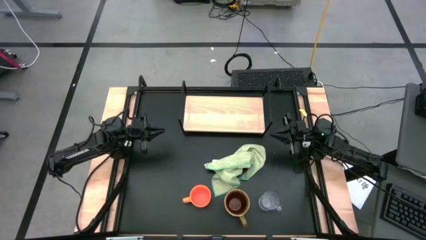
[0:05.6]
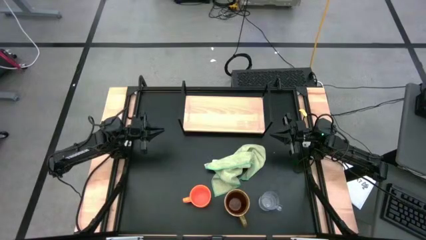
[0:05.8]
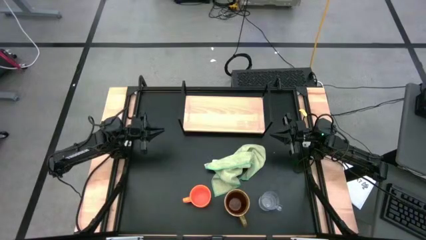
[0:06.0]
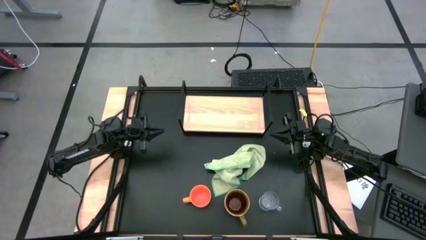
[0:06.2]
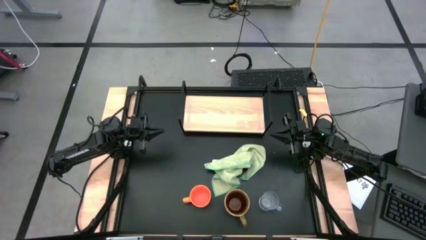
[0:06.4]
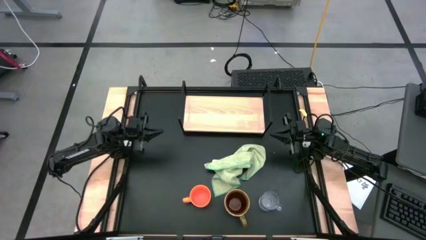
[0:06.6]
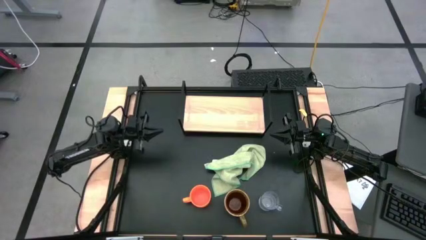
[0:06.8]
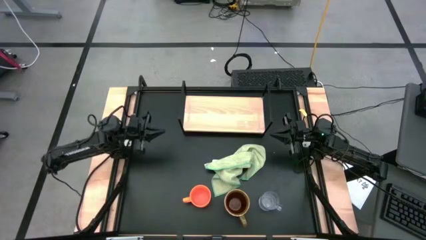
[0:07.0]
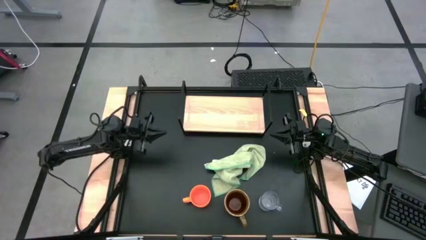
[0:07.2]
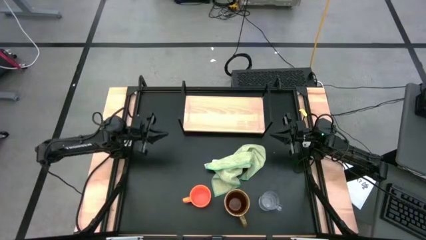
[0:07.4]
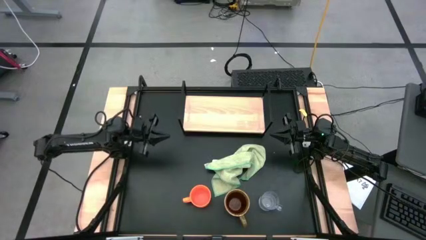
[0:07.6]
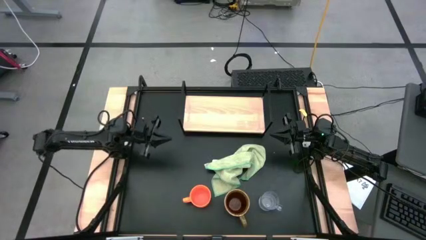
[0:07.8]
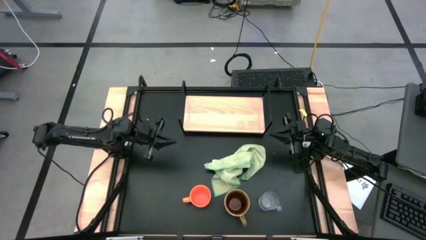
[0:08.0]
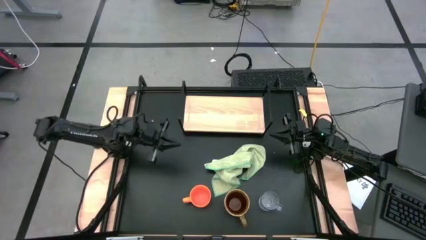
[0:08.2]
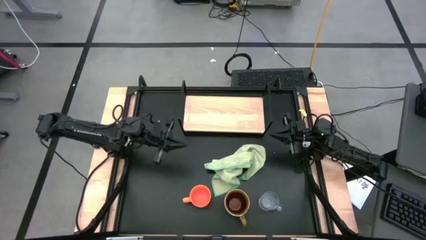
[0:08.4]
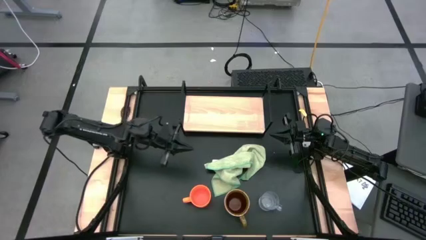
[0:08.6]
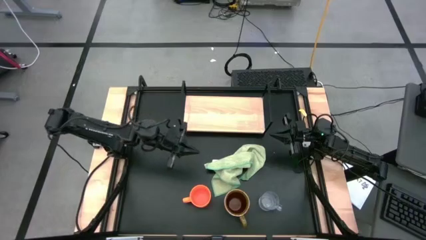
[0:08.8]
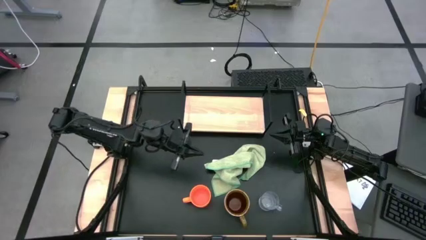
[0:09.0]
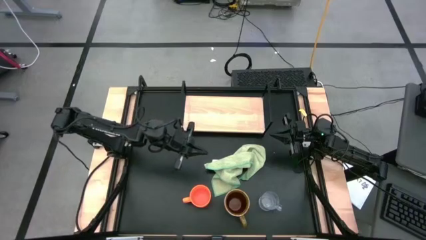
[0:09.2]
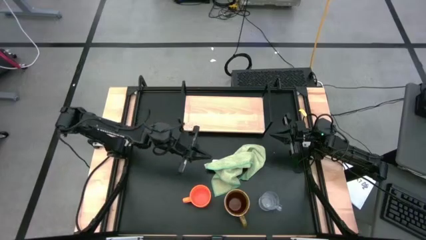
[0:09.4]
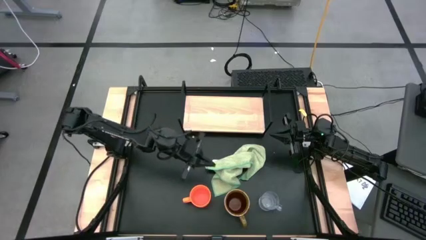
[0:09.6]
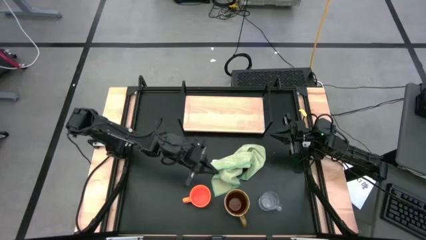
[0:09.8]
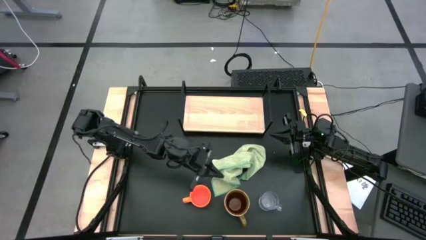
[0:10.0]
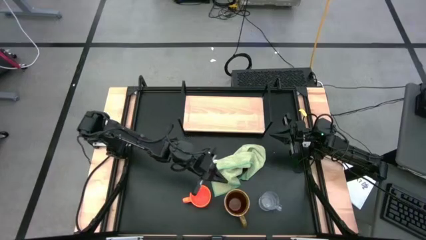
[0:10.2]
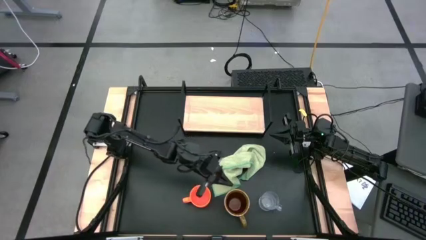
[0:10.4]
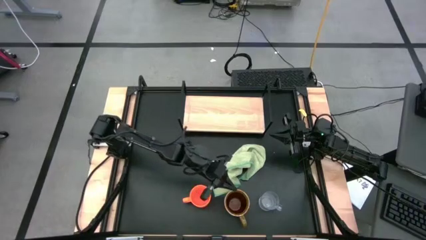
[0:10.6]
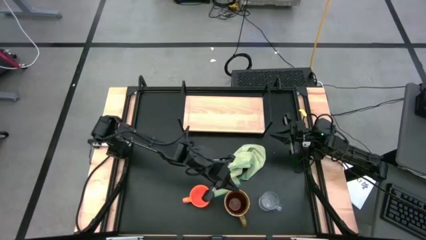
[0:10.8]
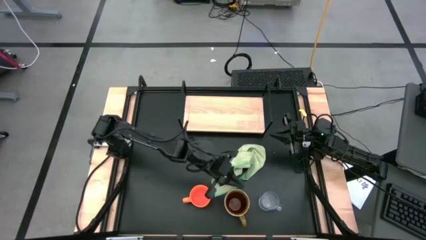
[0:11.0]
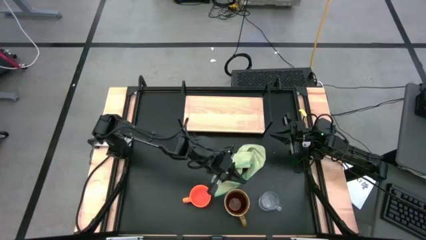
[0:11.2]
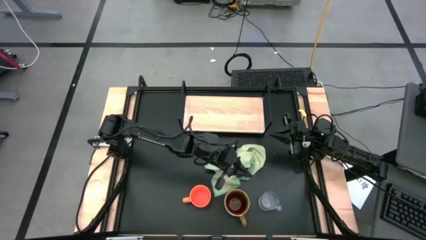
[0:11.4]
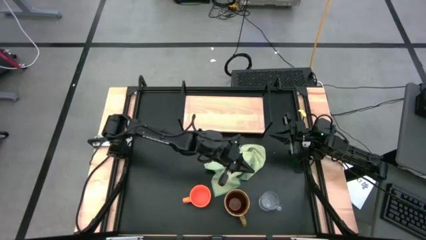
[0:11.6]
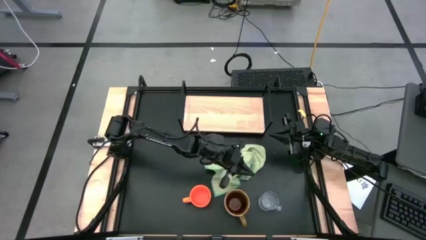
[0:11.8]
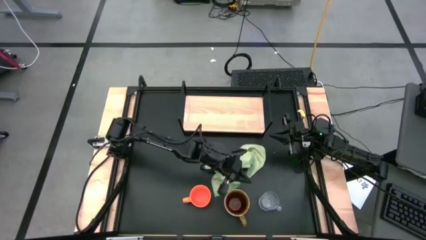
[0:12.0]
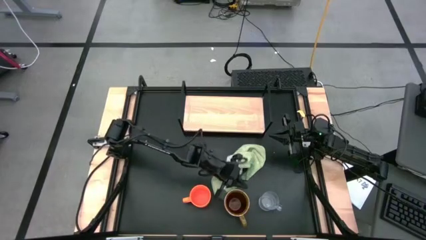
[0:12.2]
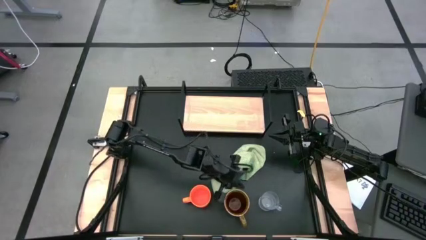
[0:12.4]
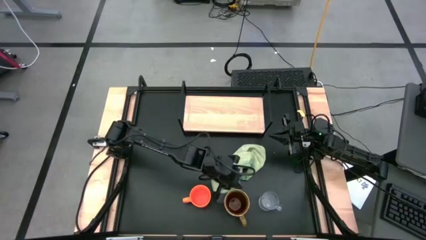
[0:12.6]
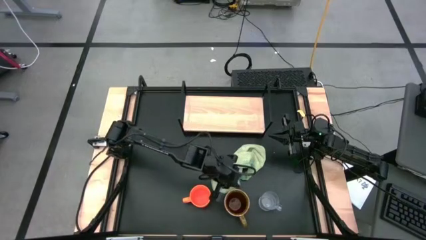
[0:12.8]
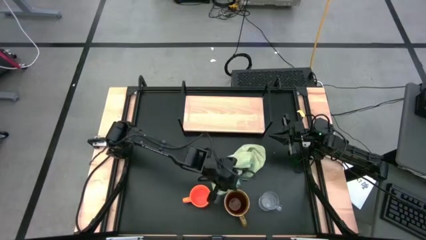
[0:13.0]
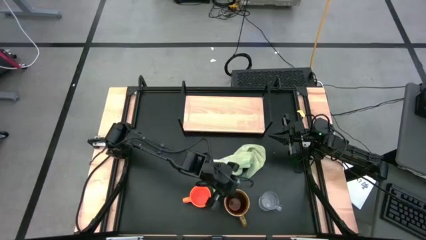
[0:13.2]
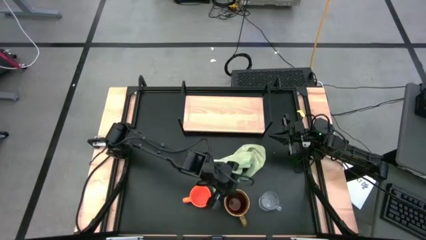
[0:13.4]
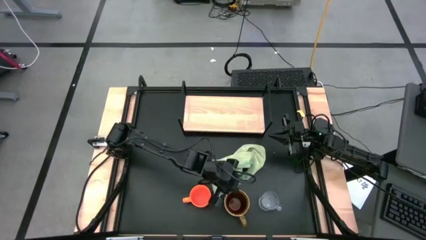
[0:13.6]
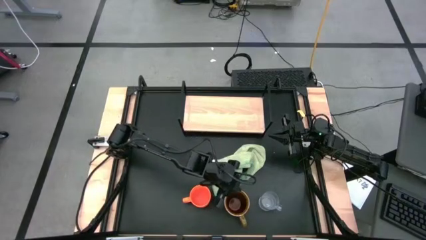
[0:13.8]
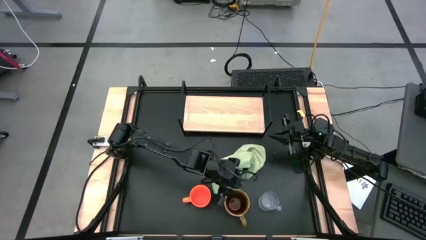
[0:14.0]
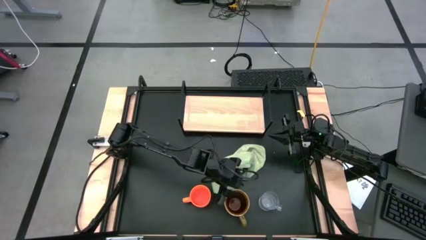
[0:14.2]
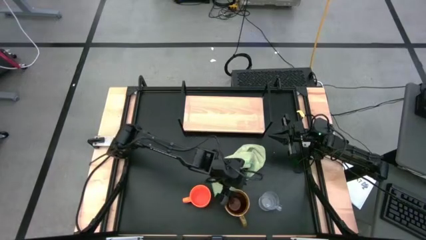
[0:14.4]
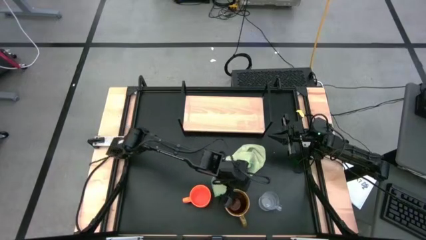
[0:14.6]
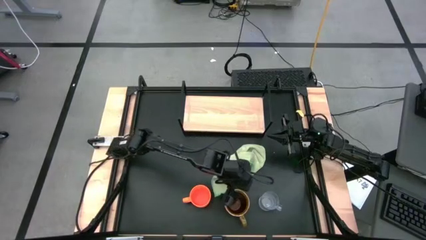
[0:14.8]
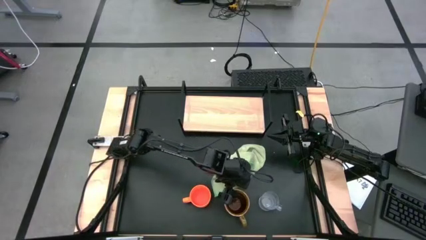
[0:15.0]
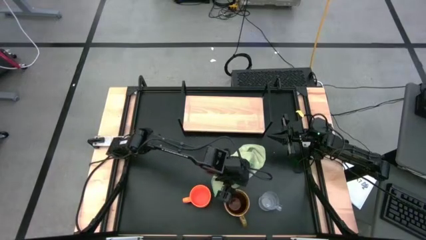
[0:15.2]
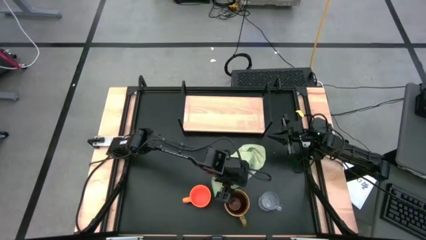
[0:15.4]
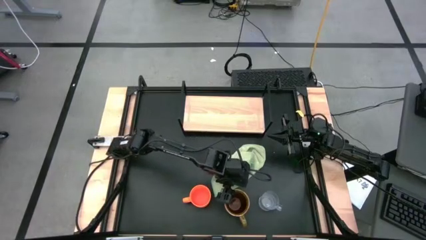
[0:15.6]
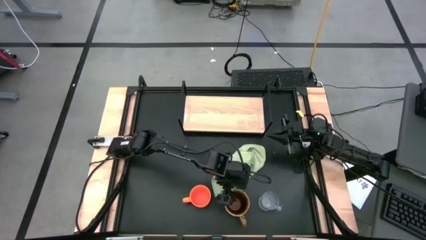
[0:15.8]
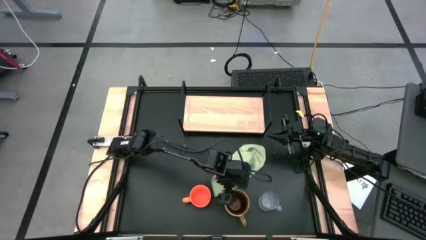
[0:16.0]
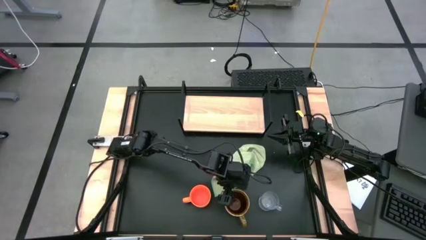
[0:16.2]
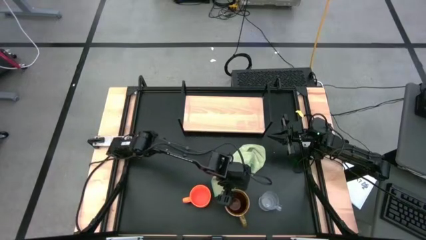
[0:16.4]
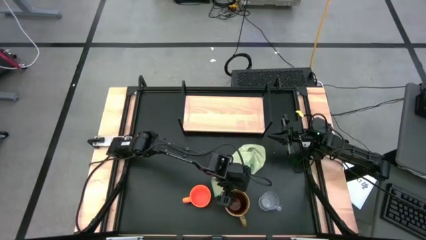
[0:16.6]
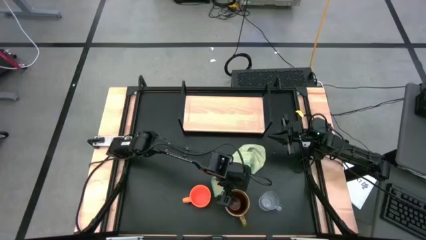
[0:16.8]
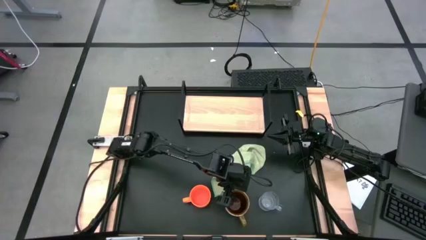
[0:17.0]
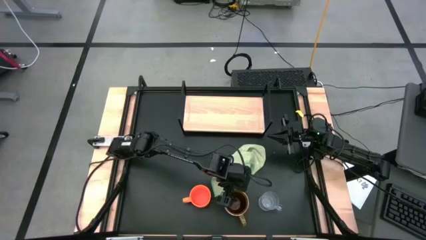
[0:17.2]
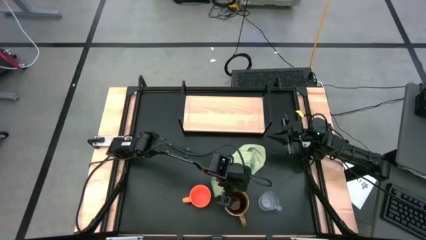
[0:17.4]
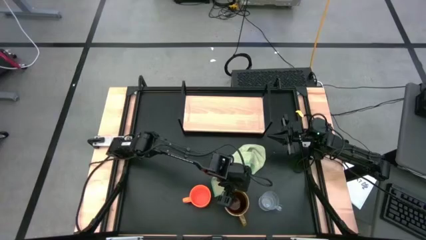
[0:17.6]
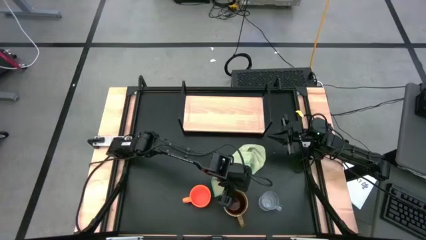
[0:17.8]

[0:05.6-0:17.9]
Task: Stack small to large cups/mugs on shelf
Put the green mug on the shelf
